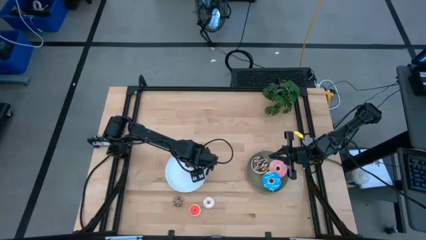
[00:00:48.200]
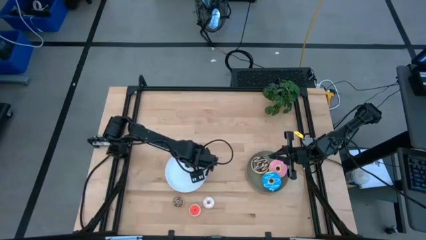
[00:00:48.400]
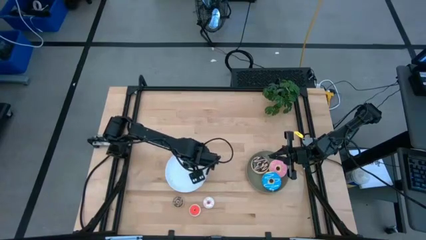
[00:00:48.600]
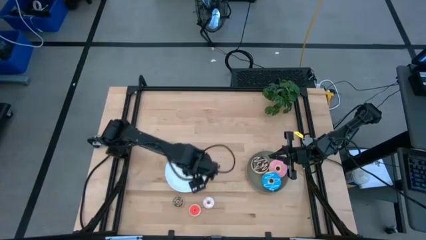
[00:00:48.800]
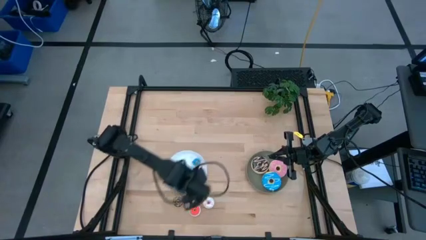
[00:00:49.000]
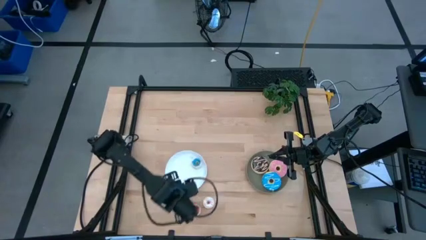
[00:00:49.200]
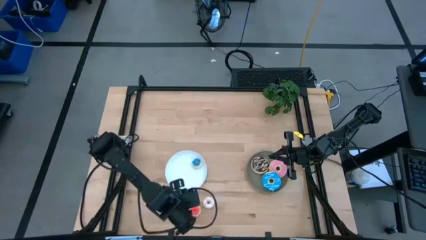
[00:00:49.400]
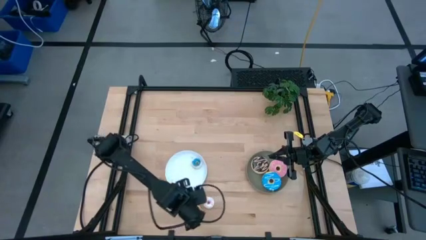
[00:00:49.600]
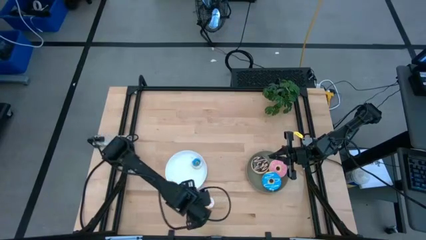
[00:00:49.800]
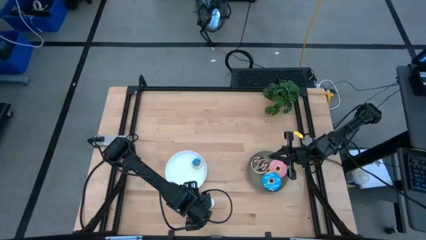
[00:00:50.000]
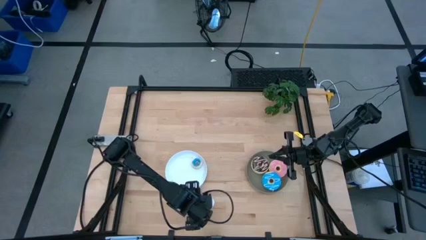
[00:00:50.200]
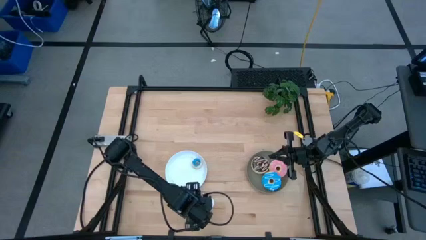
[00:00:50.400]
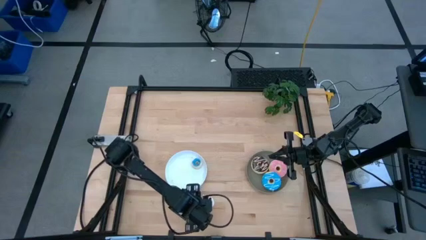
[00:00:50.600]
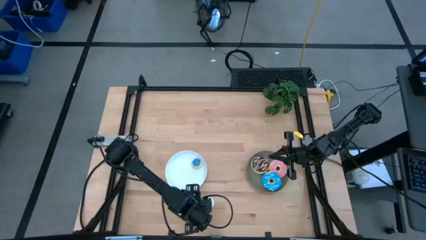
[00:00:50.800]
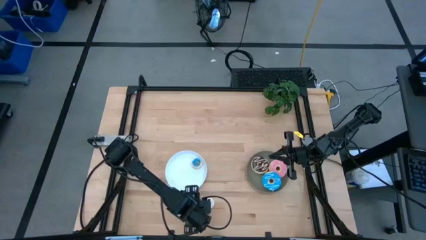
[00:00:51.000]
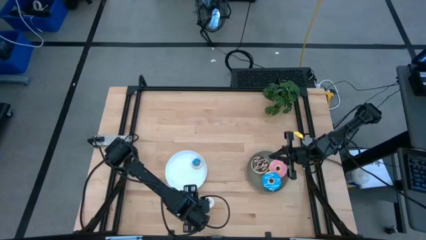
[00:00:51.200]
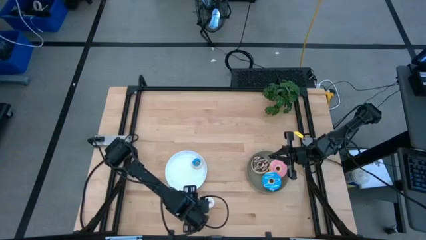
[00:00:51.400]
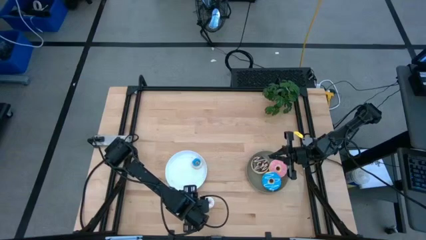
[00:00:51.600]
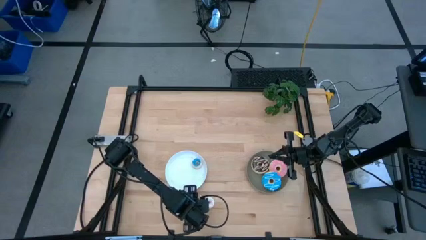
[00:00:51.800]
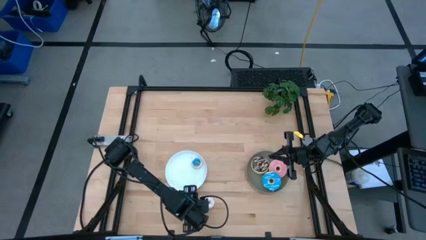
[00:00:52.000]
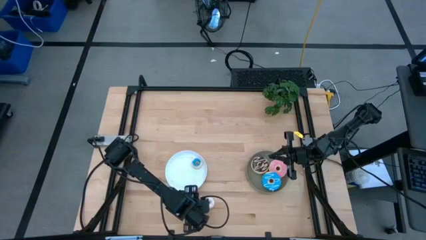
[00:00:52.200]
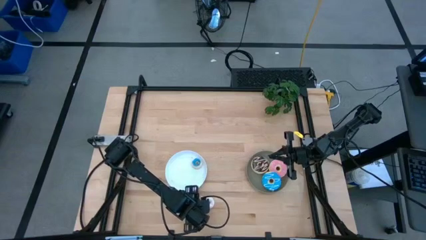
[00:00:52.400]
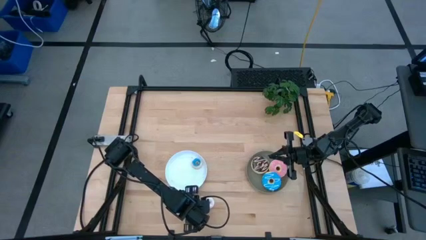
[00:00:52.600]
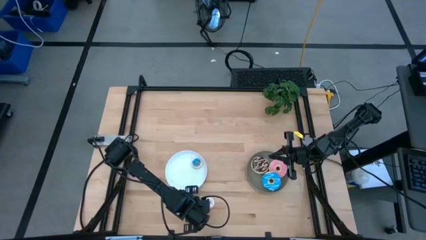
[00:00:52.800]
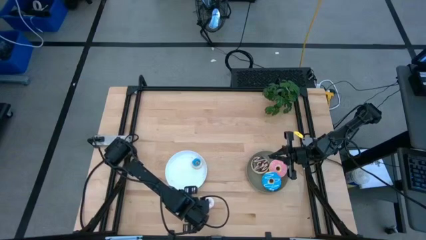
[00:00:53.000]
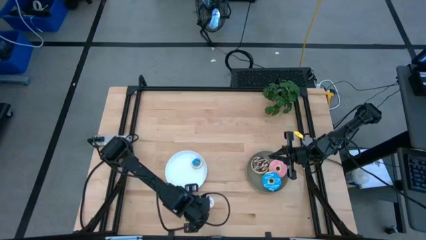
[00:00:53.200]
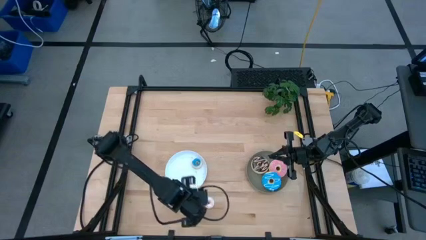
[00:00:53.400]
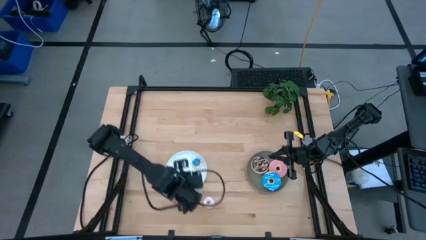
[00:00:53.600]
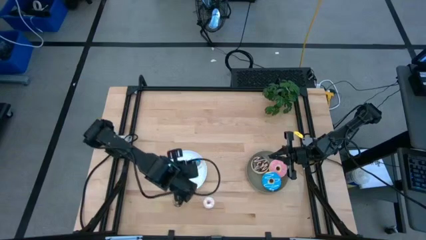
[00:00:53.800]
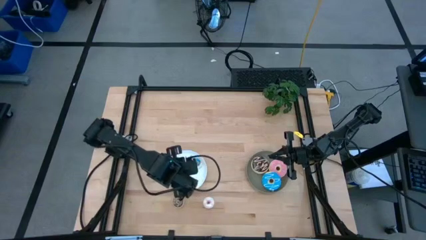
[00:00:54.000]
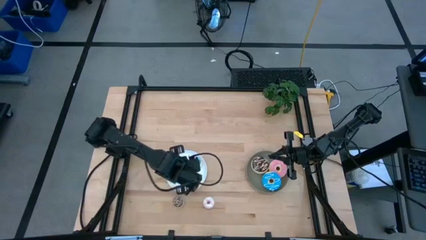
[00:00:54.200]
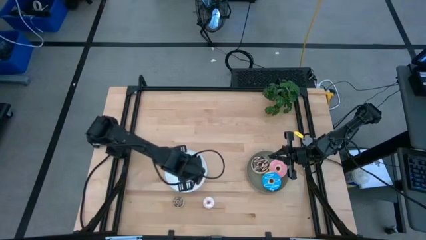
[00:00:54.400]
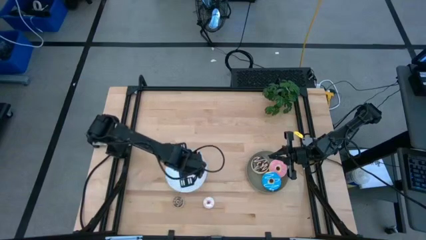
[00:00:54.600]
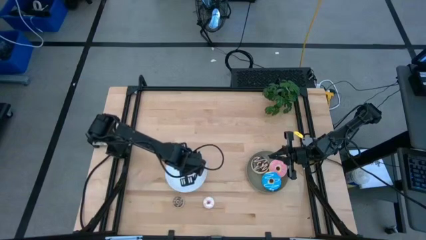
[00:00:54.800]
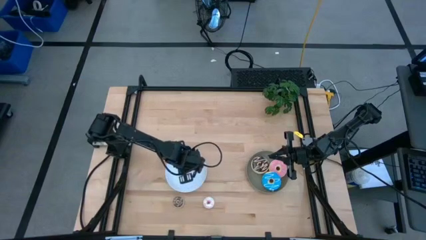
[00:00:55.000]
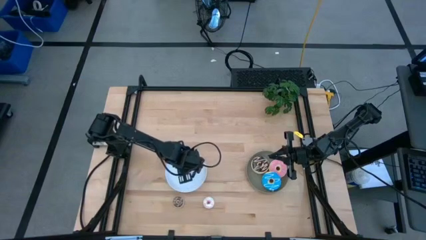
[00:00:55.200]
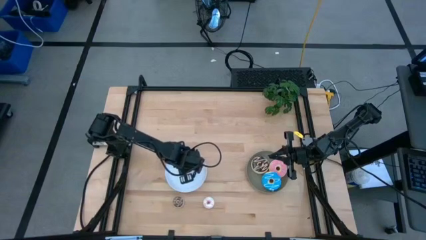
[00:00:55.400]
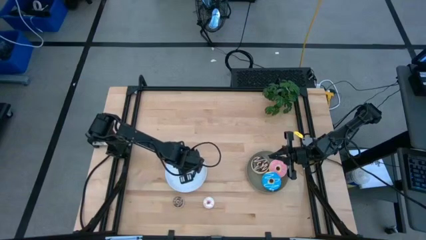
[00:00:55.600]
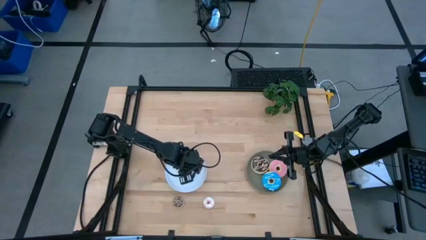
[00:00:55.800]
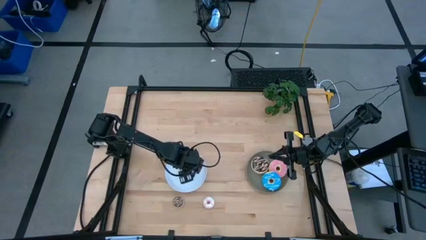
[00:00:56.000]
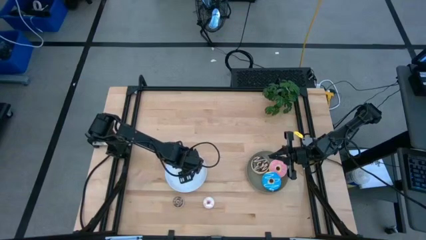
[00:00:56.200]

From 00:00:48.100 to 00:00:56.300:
Task: Pick & Place donuts
Put the small orange donut on the white plate

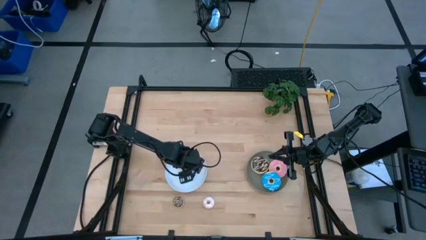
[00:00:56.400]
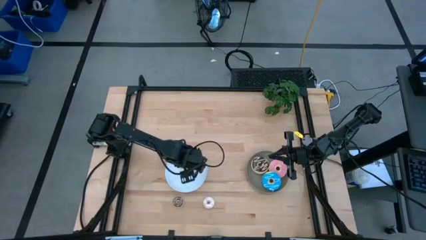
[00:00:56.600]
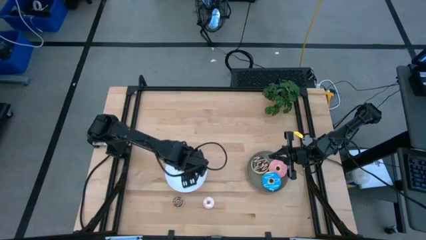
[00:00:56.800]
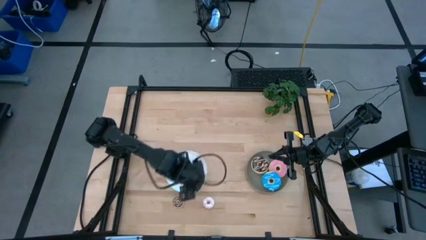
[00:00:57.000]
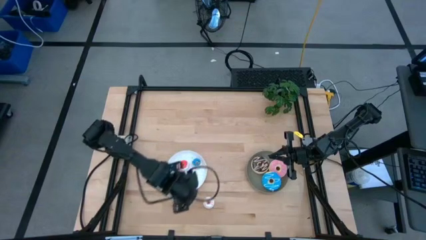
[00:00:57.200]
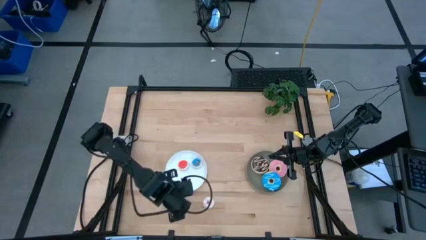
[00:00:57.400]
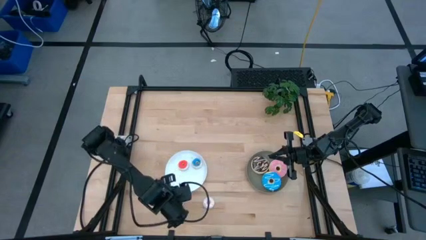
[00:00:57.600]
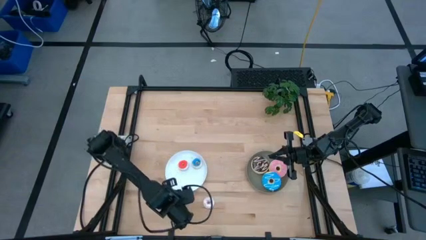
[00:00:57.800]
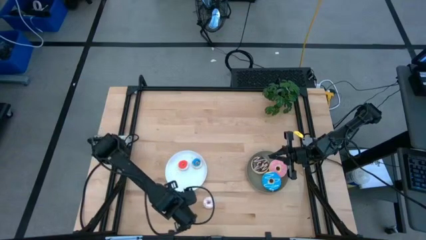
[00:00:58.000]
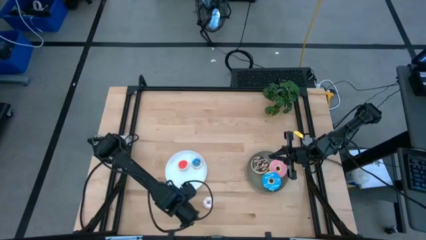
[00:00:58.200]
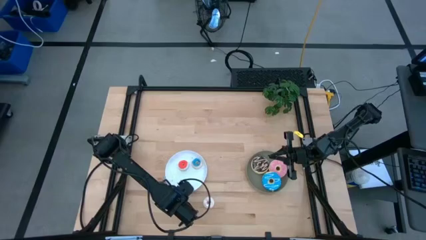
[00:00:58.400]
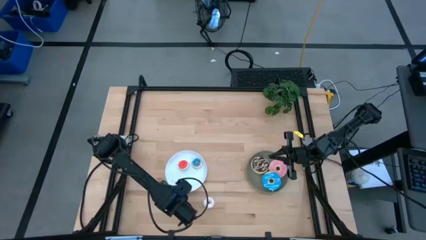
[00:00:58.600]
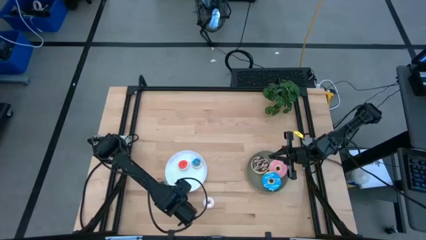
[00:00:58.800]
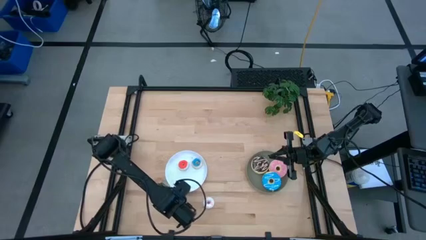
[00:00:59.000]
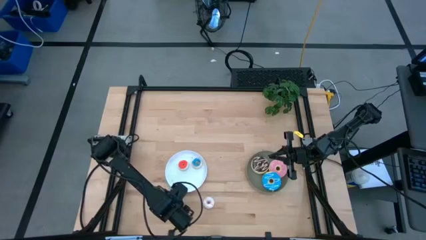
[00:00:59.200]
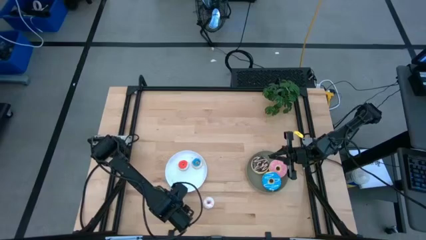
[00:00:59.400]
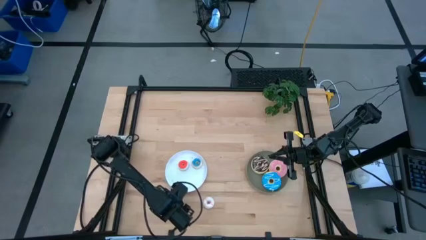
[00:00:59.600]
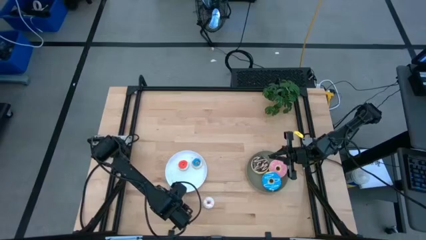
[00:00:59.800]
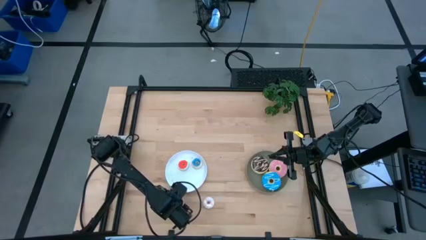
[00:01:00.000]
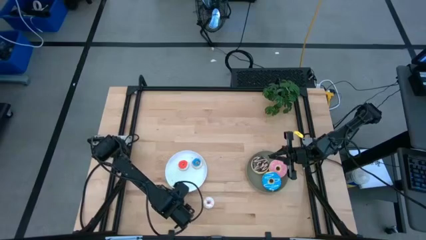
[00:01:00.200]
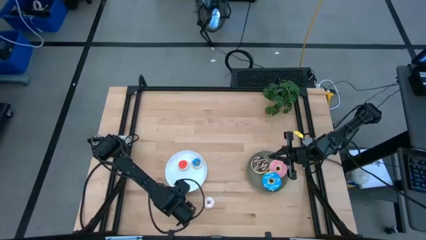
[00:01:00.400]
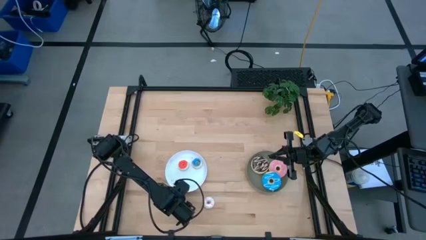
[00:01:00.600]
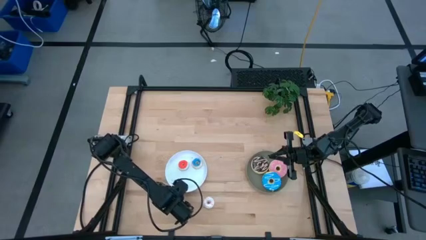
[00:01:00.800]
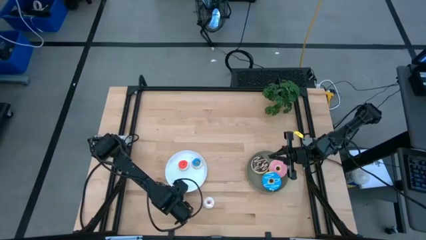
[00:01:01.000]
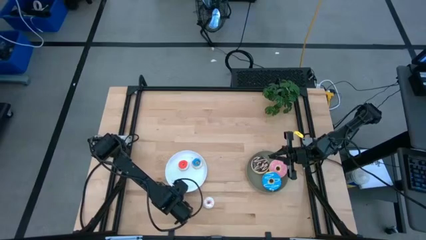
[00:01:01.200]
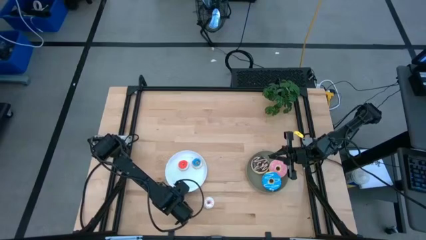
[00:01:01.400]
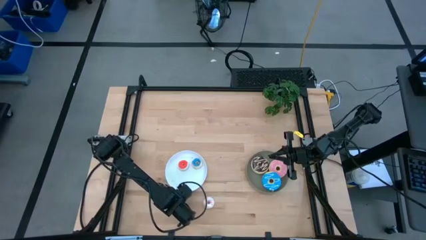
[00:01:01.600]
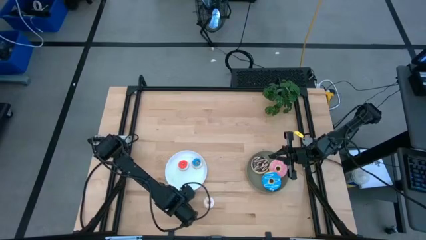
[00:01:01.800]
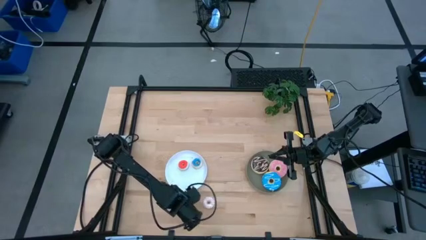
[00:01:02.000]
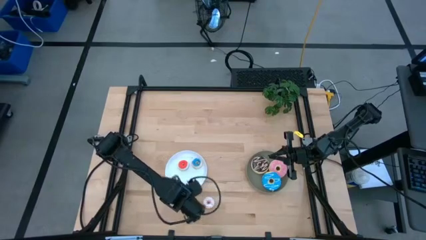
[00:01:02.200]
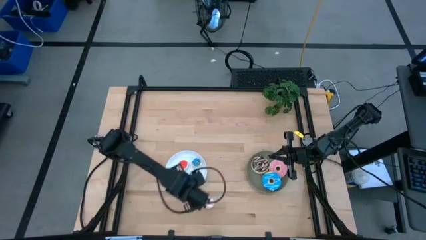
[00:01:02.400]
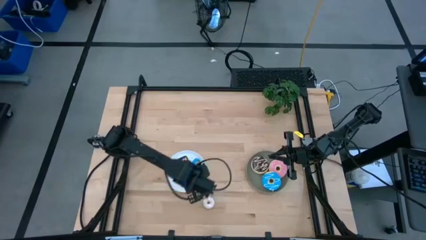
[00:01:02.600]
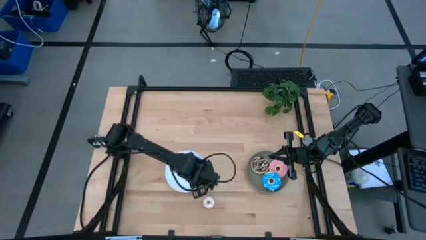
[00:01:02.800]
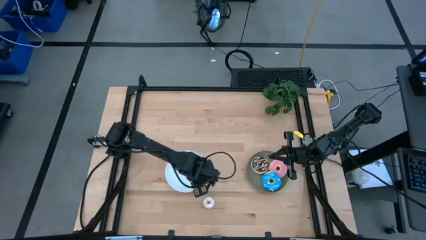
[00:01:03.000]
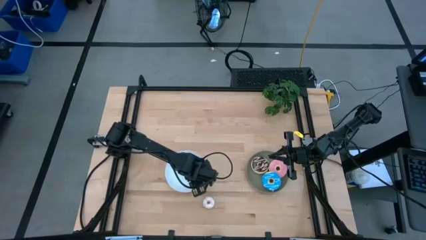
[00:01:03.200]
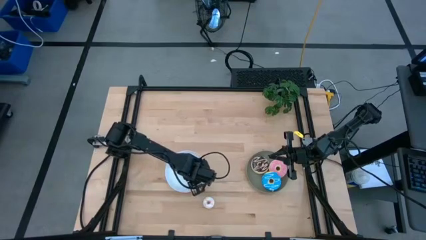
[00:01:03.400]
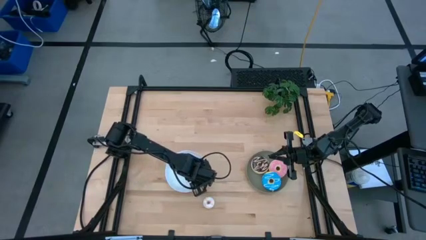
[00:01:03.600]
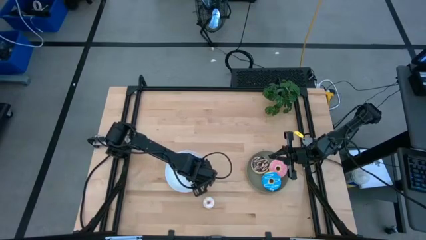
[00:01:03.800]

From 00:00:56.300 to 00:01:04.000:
Put the small brown donut on the white plate
